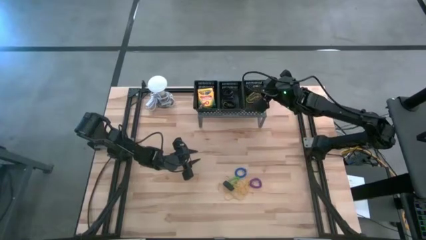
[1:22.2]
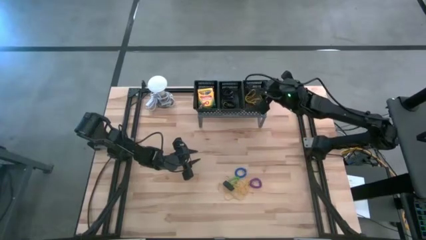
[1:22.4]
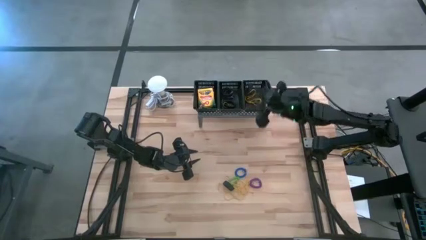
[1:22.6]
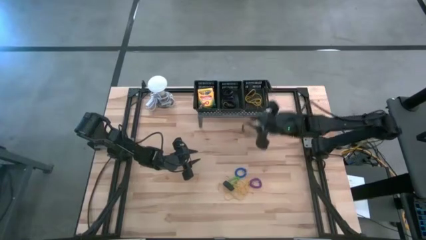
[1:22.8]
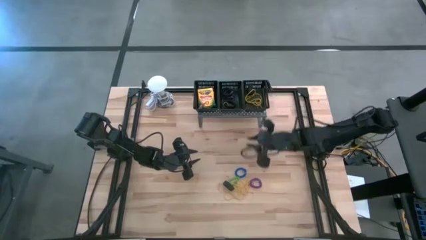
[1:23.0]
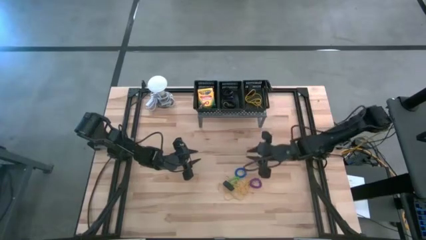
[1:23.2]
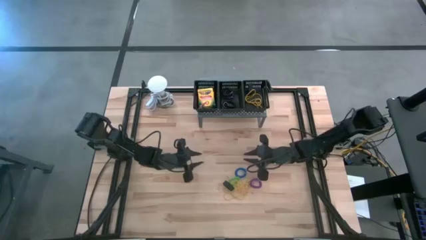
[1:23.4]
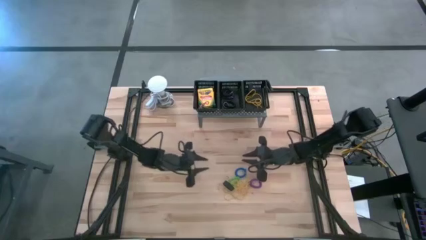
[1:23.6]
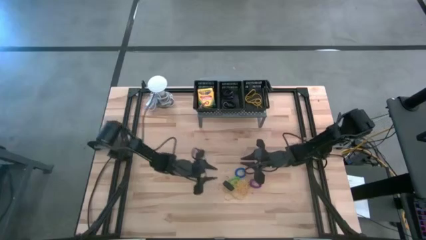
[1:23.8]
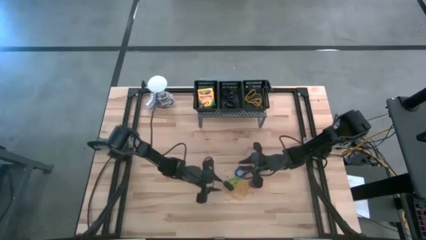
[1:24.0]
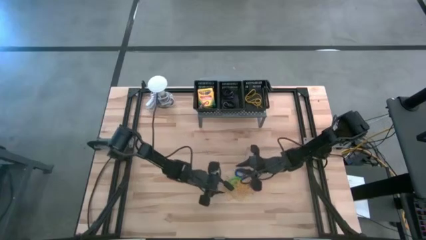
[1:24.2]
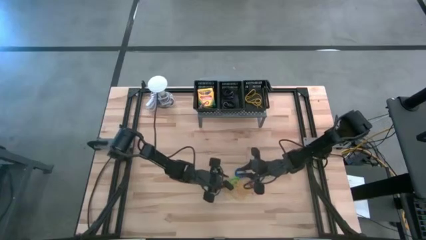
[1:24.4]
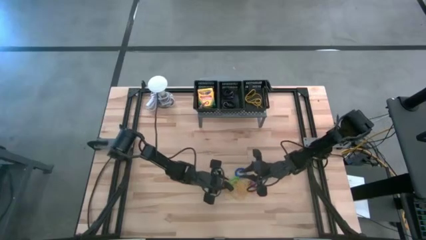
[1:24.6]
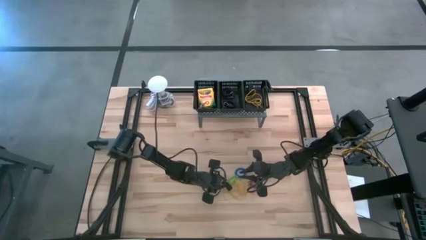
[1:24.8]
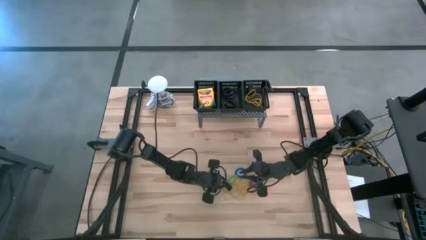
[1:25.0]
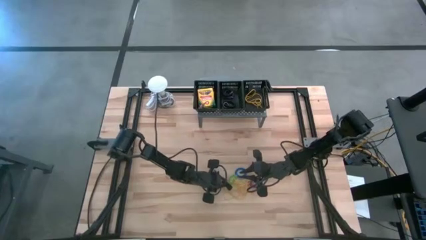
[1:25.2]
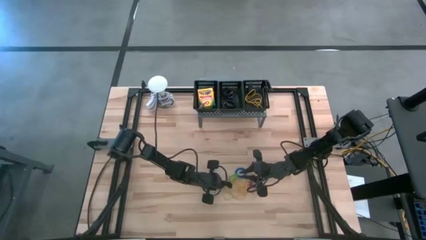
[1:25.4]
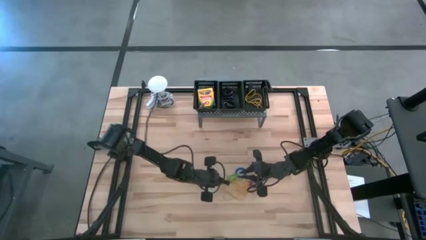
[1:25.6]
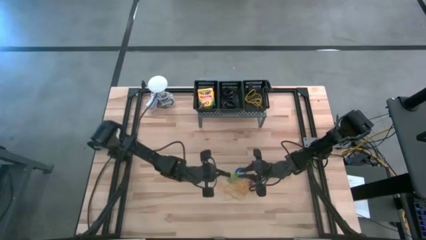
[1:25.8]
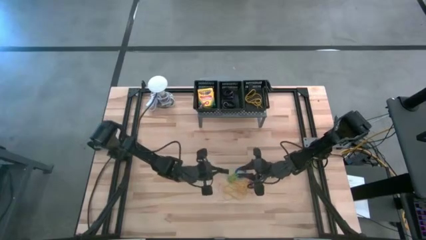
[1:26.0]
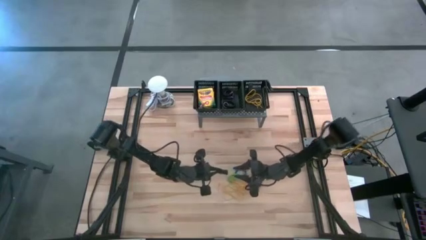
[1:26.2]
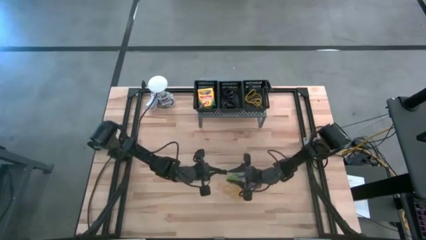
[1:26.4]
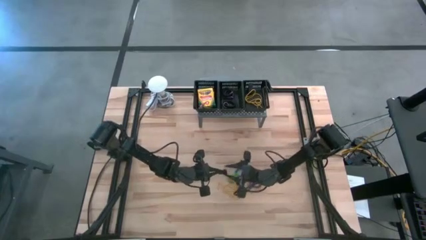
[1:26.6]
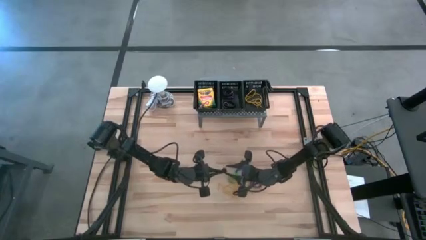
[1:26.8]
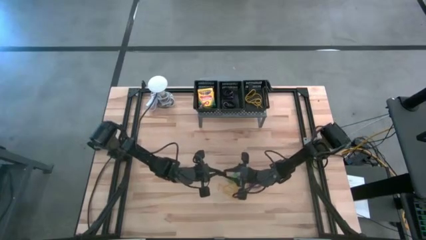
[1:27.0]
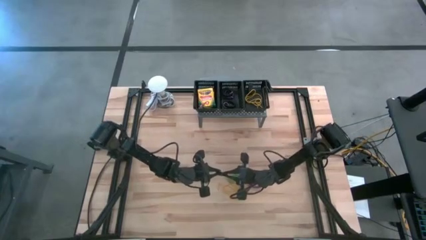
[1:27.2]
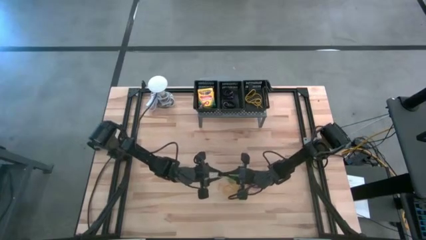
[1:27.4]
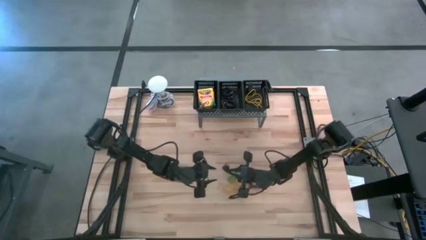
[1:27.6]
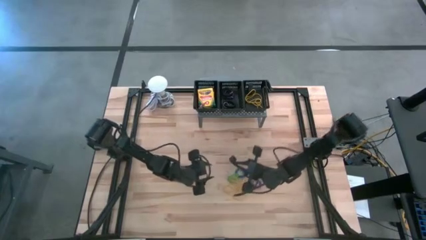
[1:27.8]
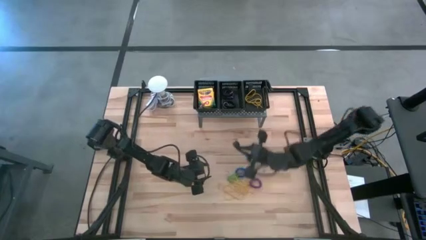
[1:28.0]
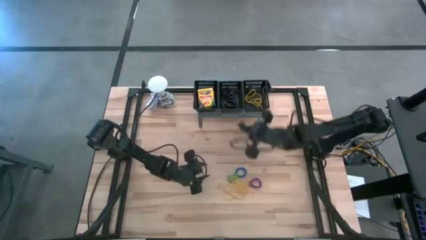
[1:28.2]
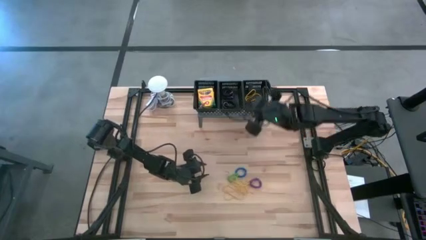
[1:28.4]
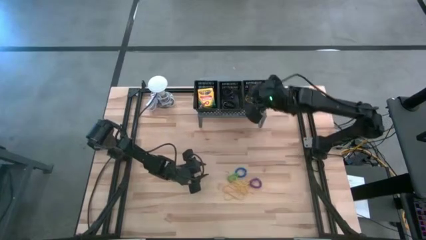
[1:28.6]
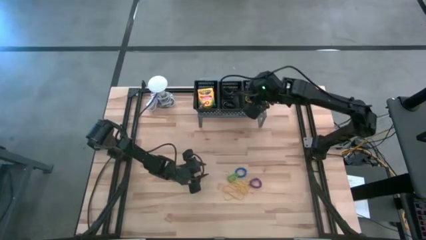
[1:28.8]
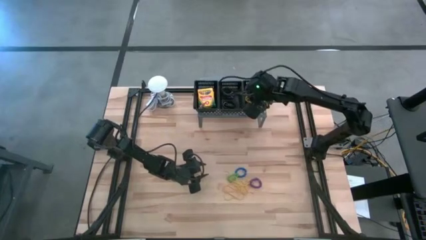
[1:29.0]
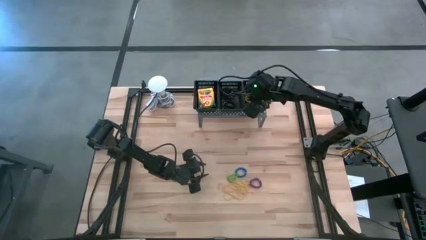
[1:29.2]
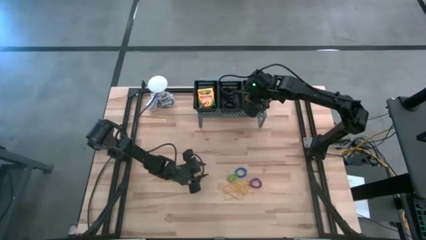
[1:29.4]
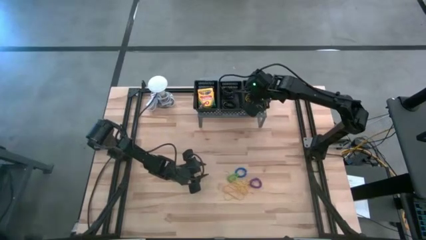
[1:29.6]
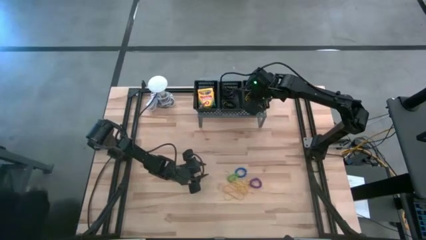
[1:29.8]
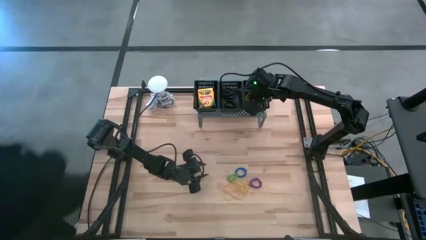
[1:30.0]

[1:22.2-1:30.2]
Task: Pick & Place Office Desk Supplies
Put the black rubber band into the right black bin on the shelf

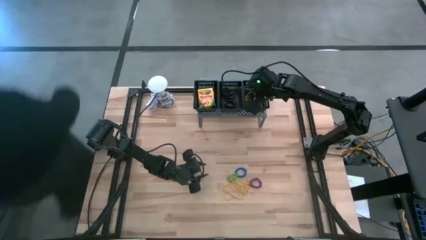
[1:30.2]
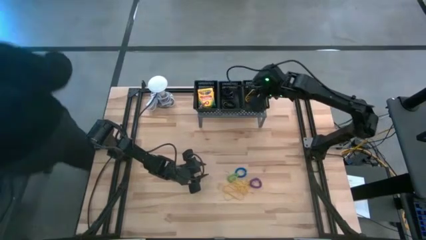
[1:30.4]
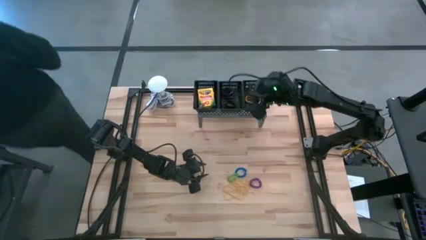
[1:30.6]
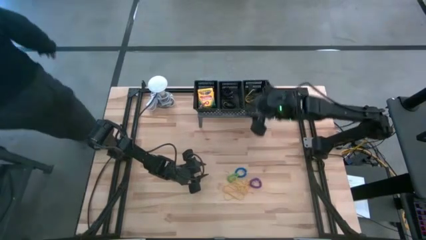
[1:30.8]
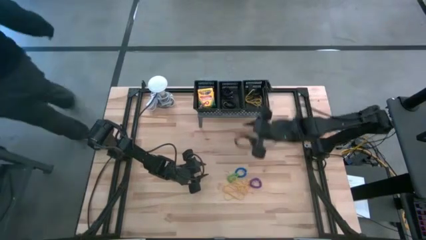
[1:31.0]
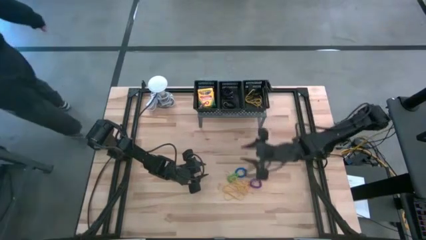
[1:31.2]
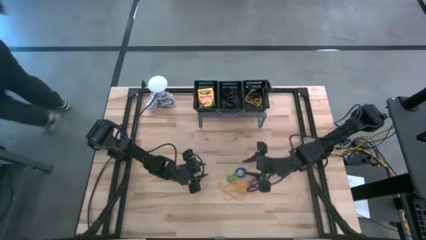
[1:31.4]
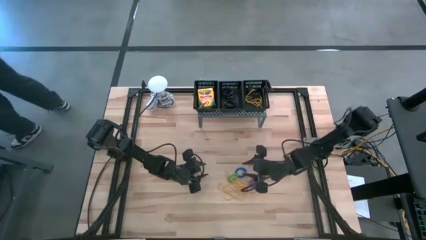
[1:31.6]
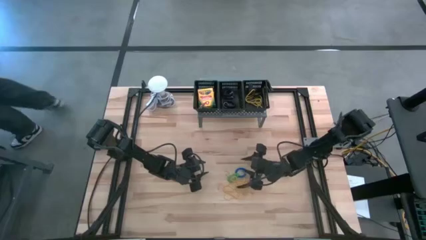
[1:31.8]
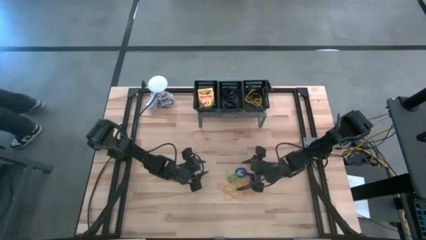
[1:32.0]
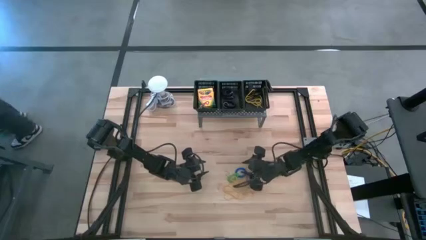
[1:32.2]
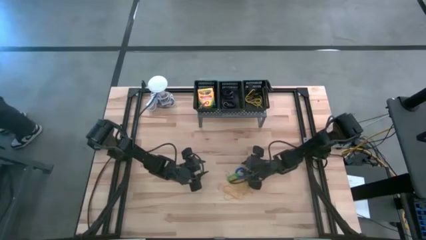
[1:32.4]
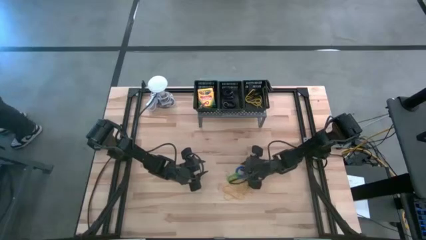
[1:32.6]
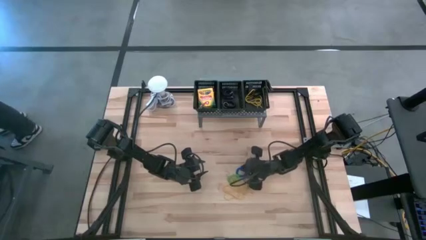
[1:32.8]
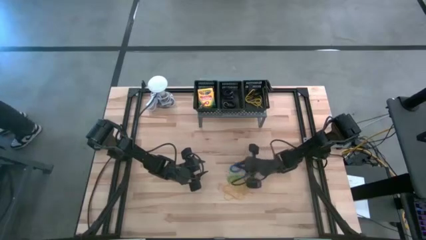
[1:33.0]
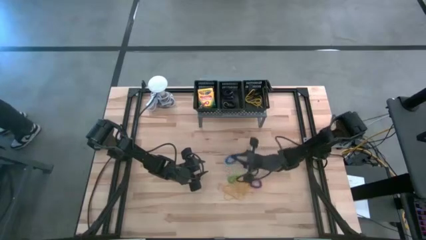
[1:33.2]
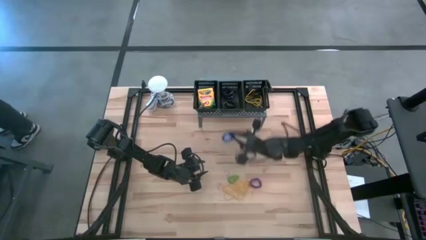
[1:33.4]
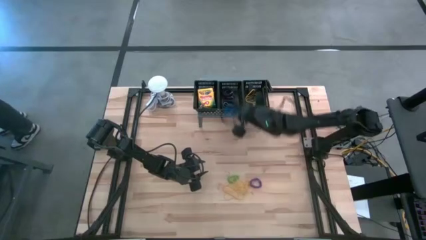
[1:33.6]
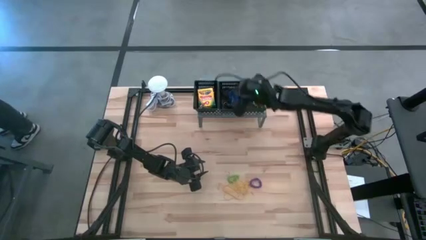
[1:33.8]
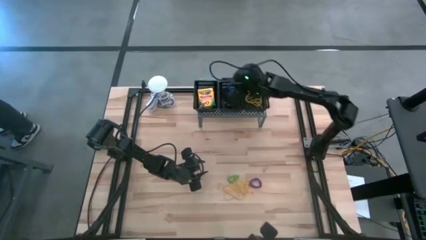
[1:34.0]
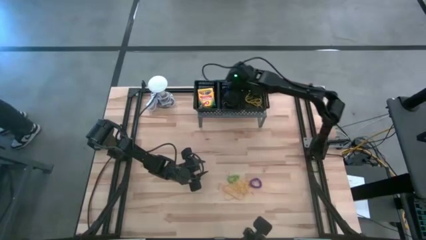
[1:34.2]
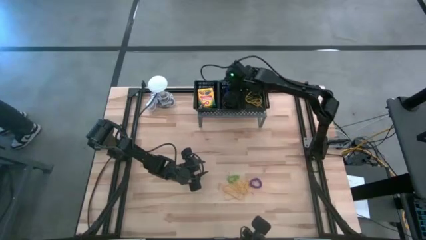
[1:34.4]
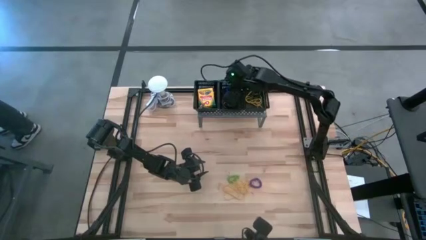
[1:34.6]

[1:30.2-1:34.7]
Put the blue spring keychain into the middle black bin on the shelf

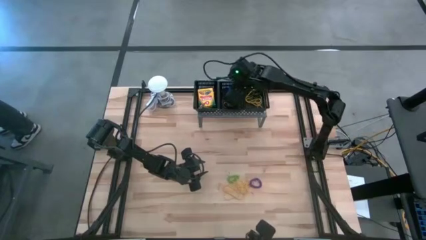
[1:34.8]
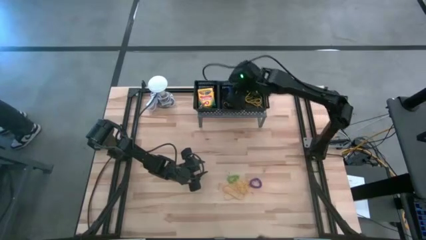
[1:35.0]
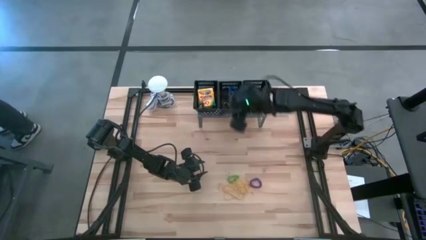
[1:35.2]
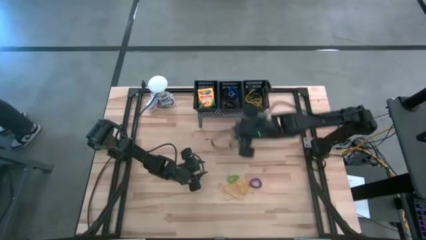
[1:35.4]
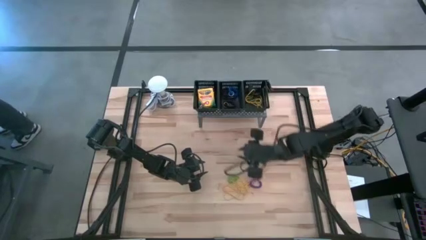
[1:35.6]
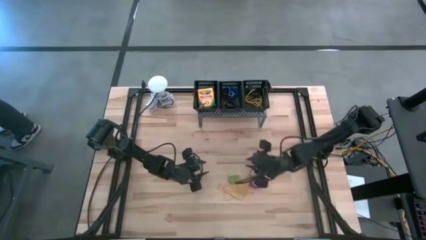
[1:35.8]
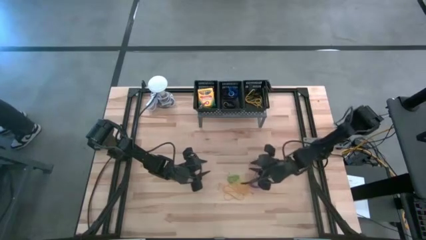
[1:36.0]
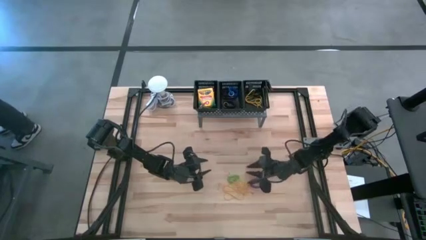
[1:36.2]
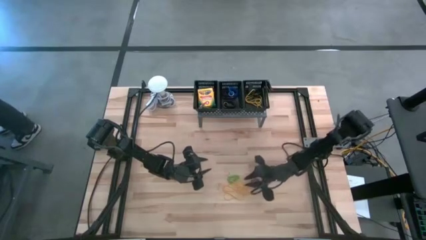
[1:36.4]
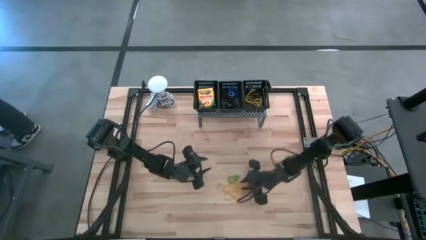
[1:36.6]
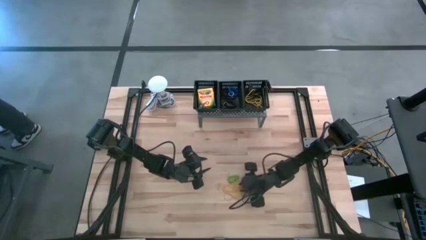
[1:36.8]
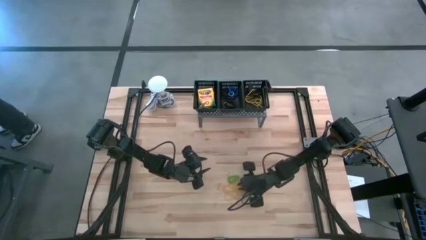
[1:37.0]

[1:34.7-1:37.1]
Put the yellow rubber band into the right black bin on the shelf

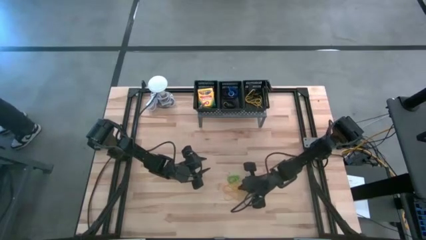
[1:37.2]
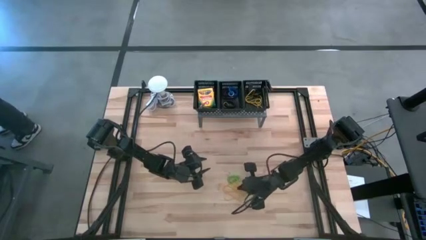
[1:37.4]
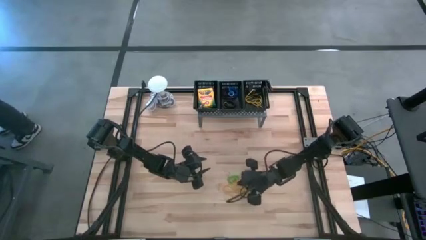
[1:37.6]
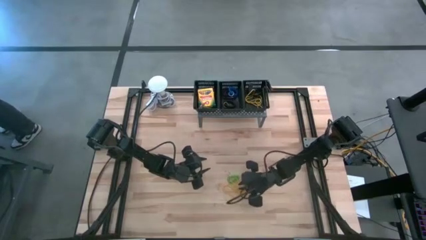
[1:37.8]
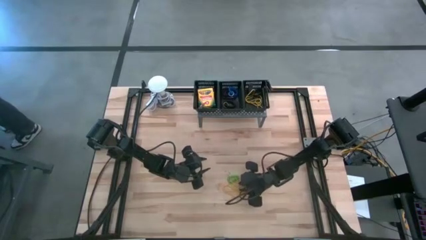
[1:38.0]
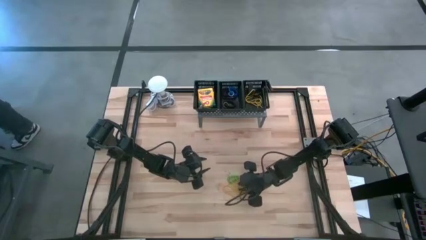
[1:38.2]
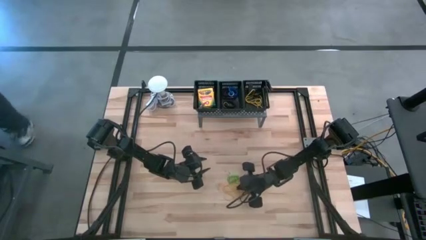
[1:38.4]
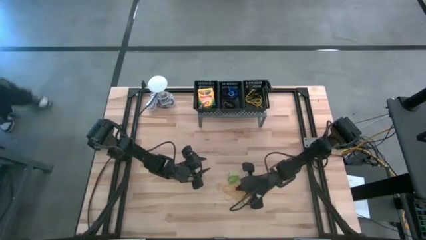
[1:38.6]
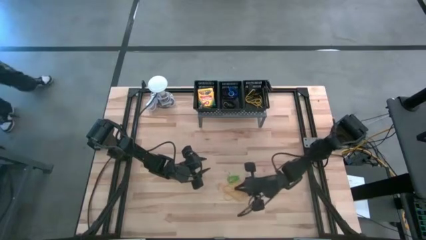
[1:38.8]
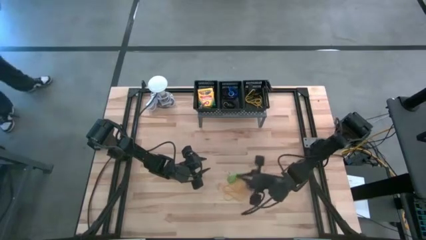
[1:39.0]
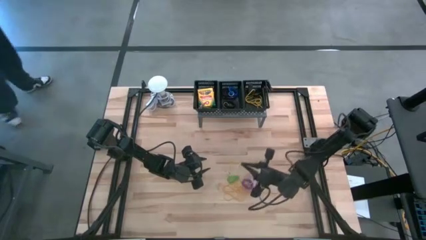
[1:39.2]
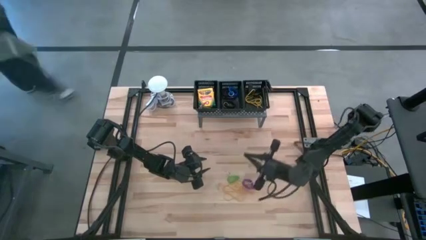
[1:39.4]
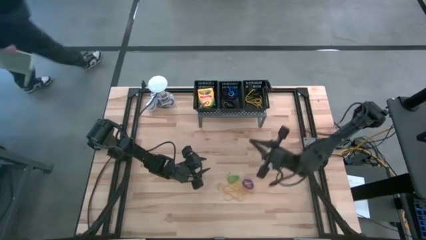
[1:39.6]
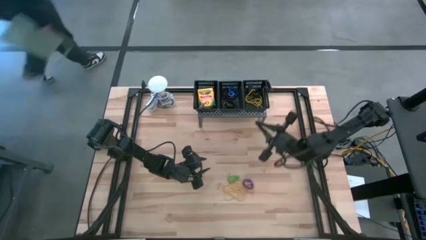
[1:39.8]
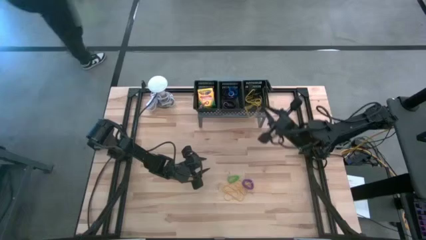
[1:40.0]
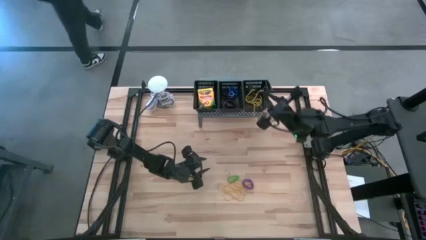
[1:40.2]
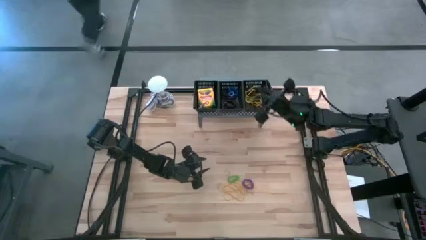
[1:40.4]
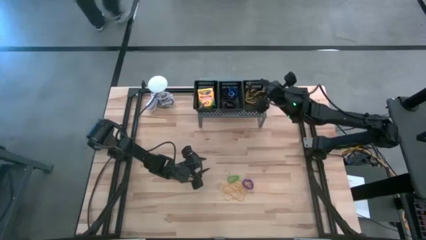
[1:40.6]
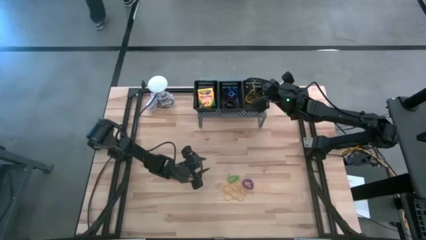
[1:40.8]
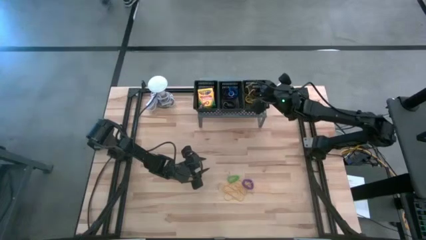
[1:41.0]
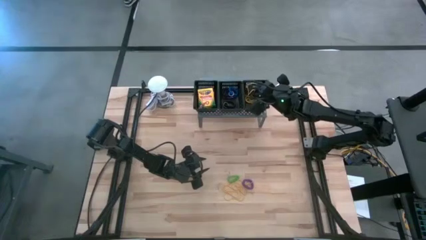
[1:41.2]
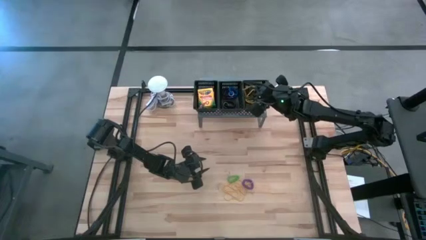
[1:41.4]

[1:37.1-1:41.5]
Put the yellow rubber band into the right black bin on the shelf
